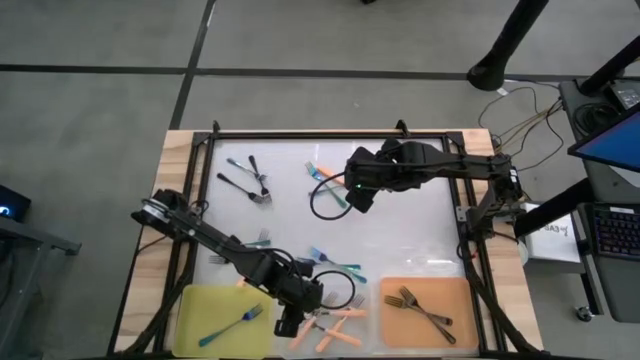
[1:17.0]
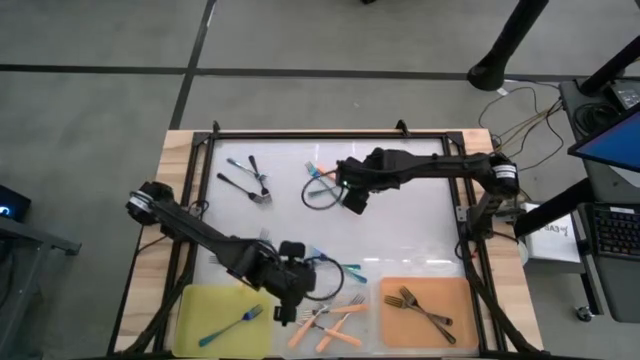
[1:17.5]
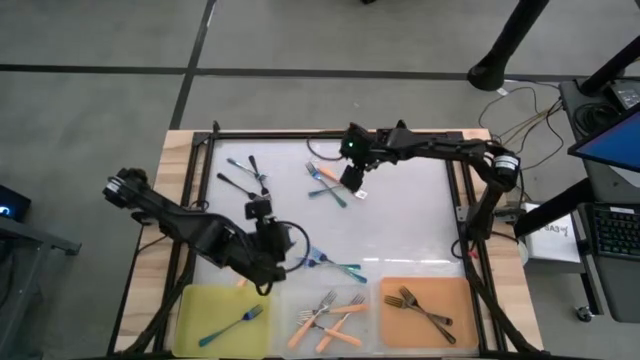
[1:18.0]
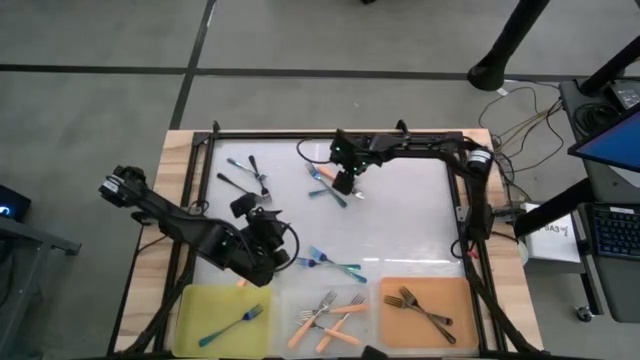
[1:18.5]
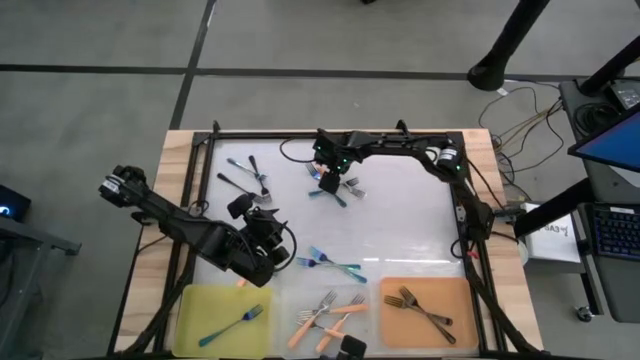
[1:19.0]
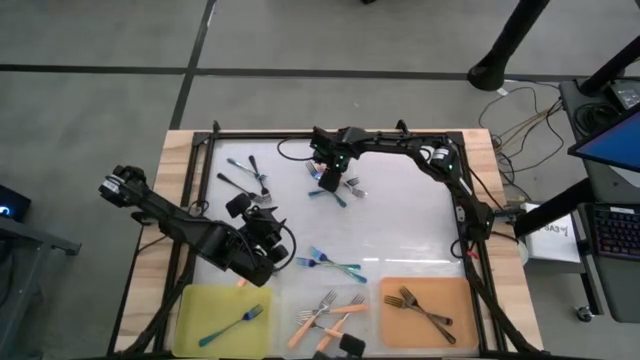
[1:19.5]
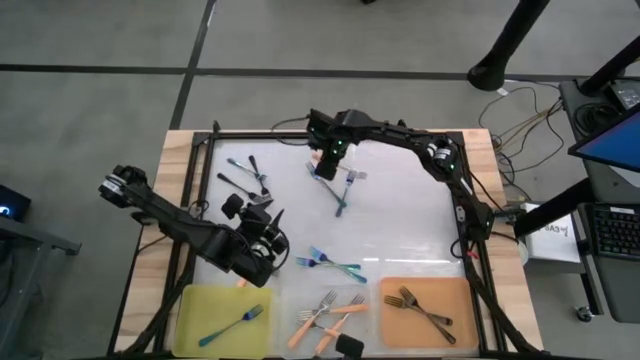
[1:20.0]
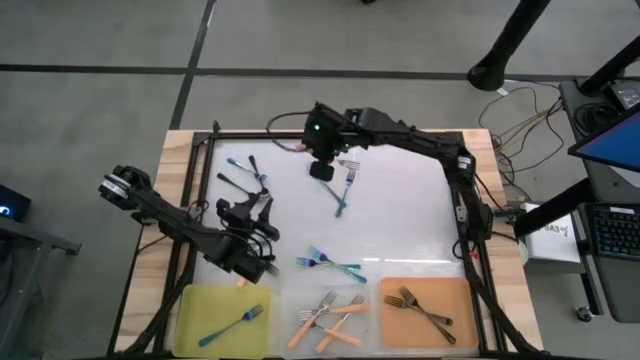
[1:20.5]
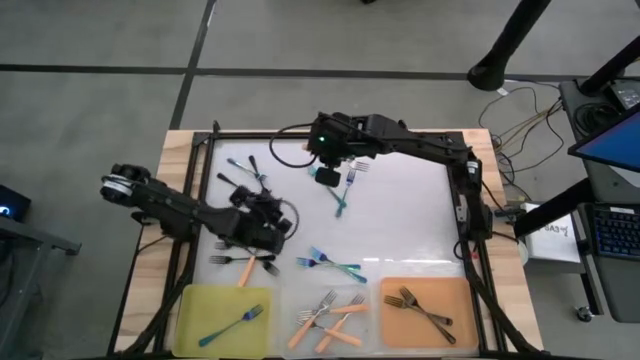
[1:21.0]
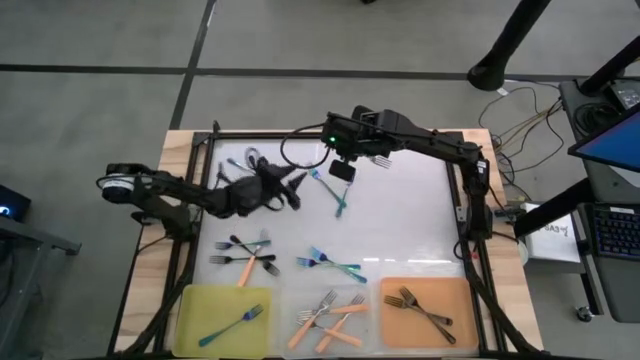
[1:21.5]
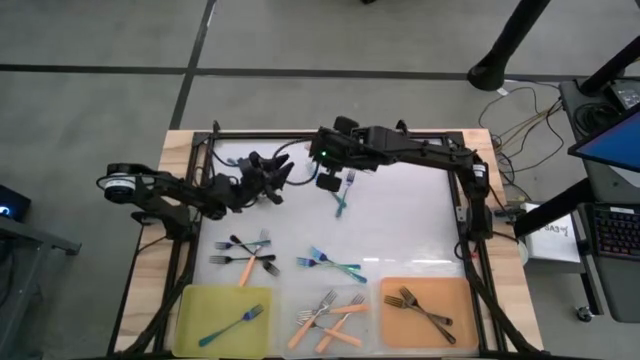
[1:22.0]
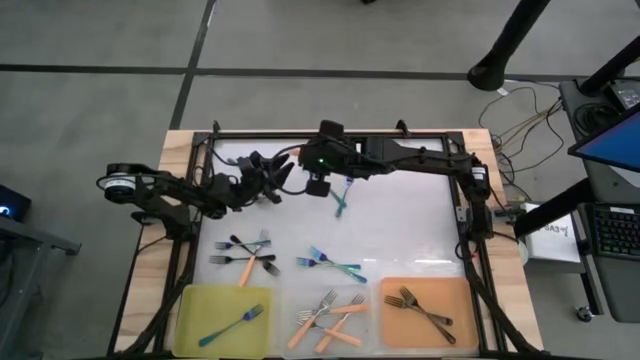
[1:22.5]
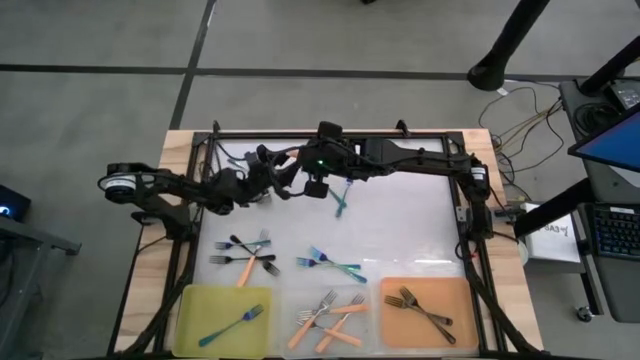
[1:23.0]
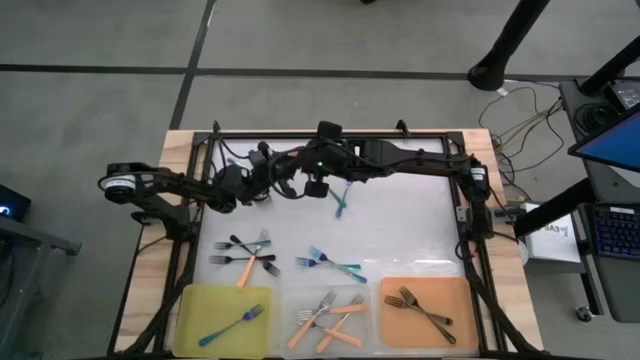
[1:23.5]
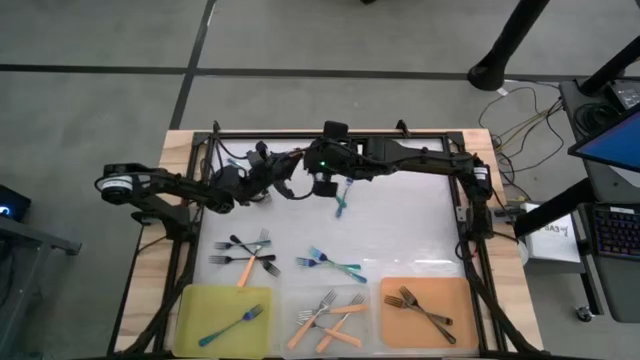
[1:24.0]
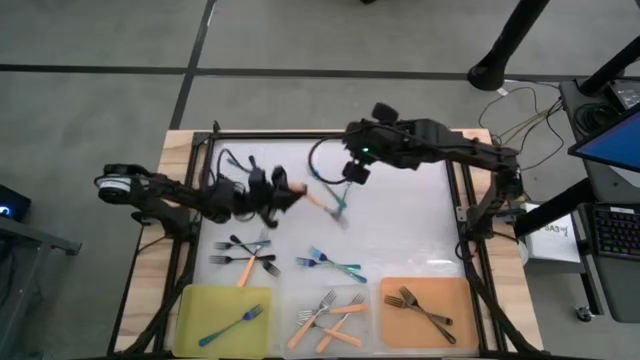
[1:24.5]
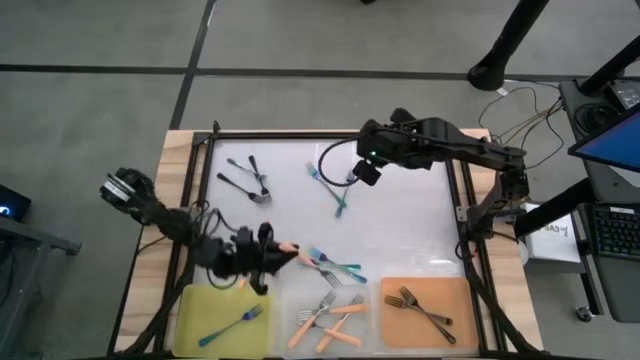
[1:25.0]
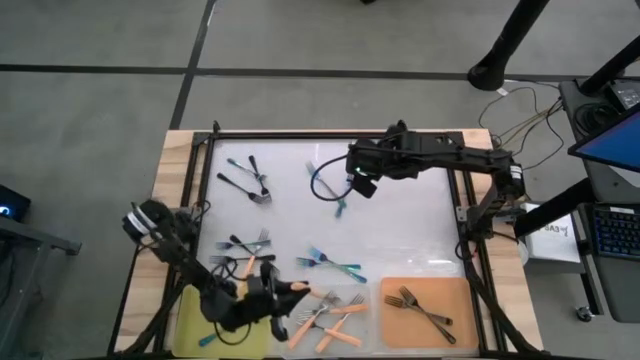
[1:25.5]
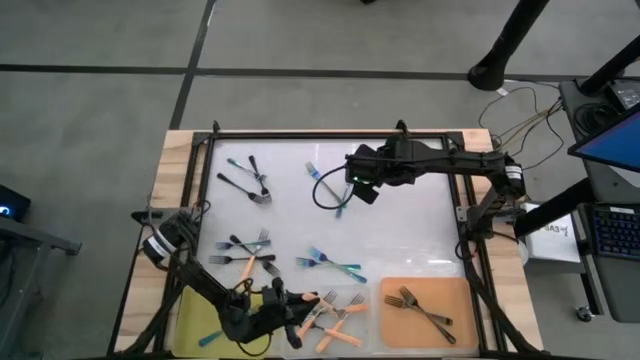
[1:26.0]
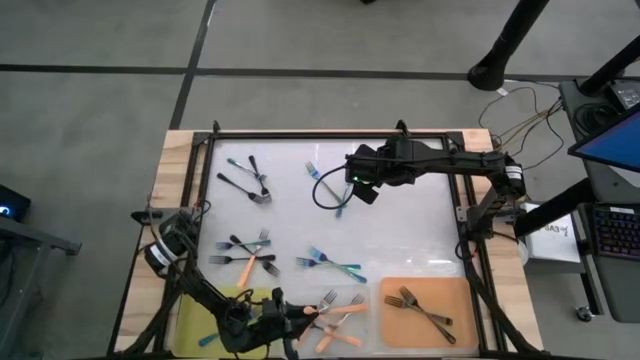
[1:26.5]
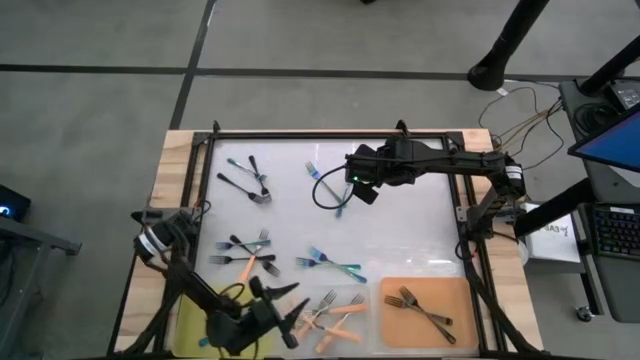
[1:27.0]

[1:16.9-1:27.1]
Task: Sort silverware by color (type)
Put the orange fork into the transparent bin

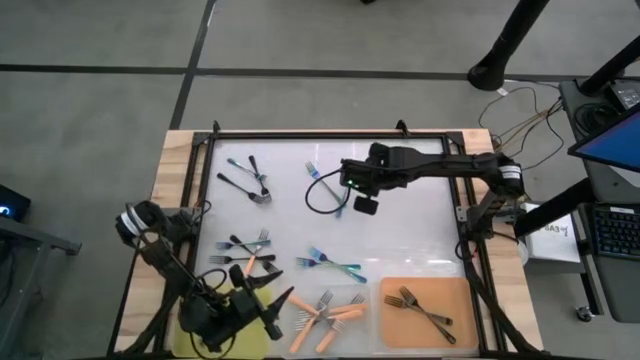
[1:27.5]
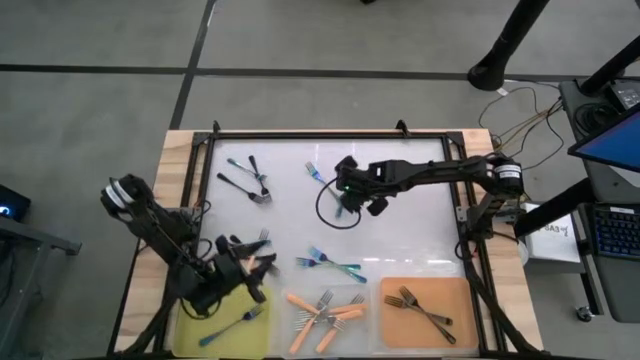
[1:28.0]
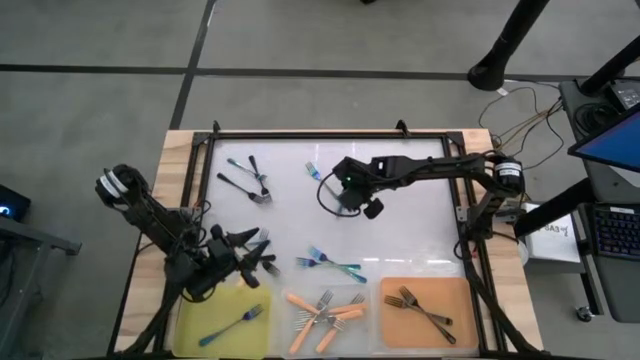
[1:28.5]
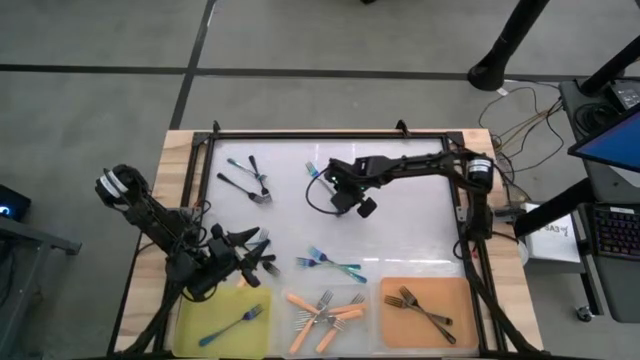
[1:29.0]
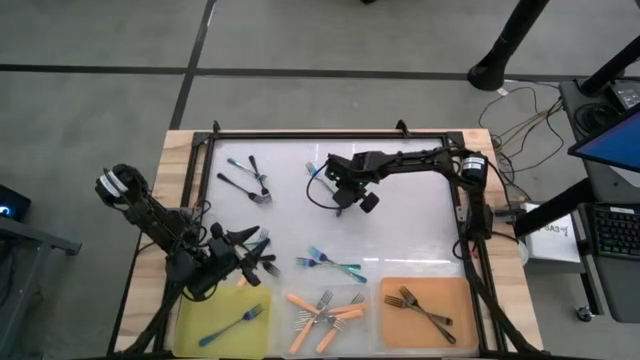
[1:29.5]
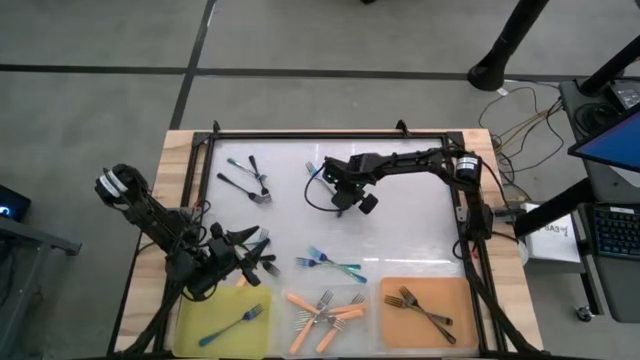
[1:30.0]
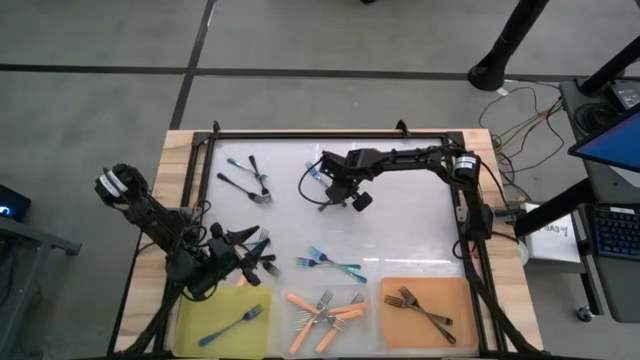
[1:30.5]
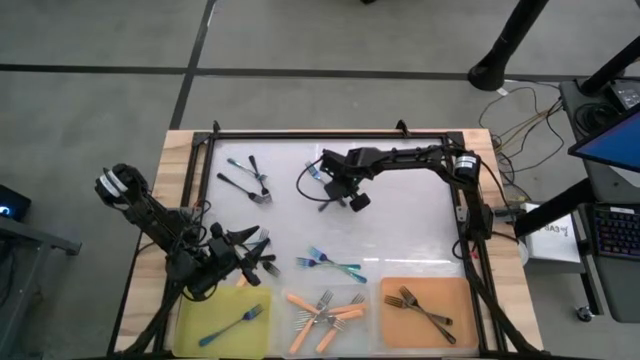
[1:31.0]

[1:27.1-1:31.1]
Put the blue fork into the yellow bin

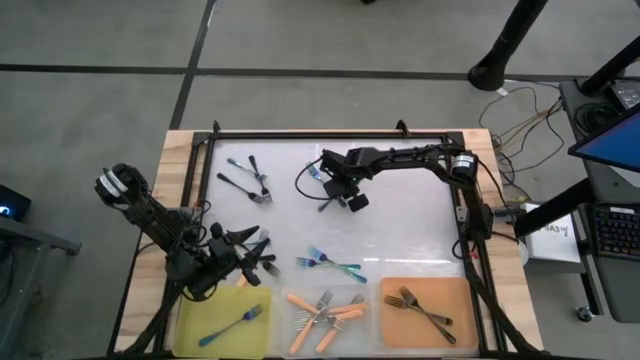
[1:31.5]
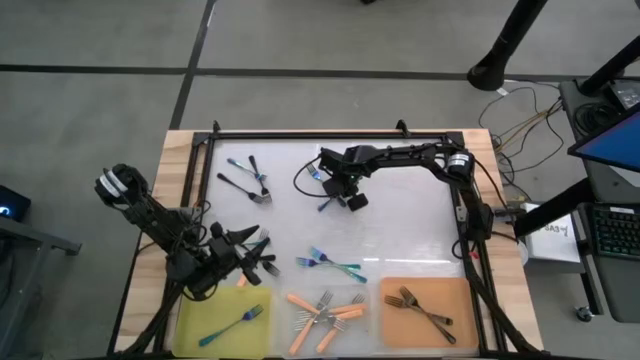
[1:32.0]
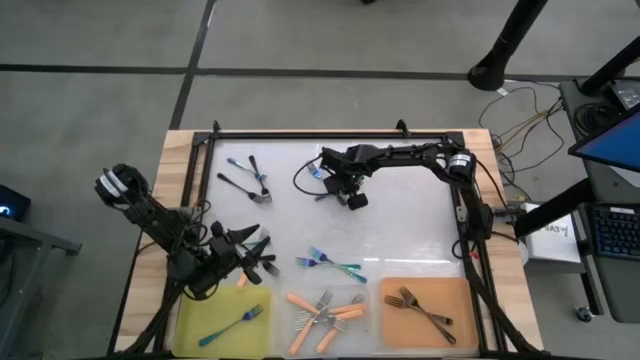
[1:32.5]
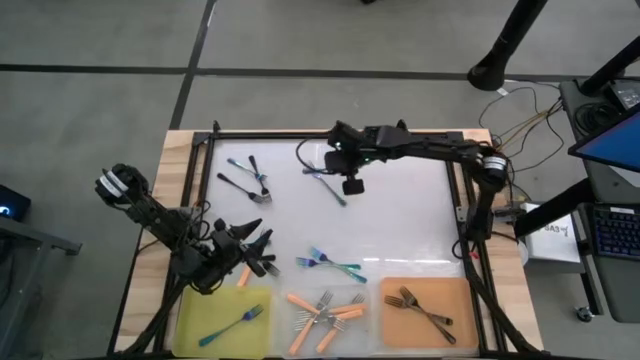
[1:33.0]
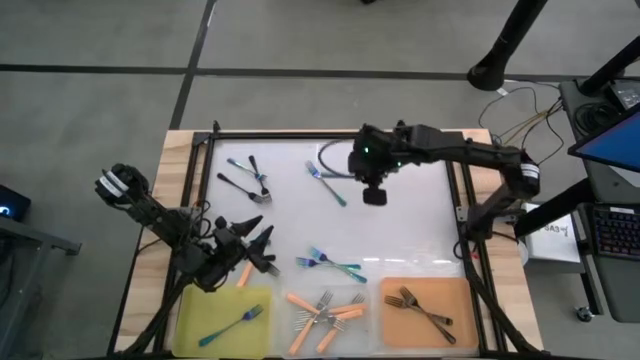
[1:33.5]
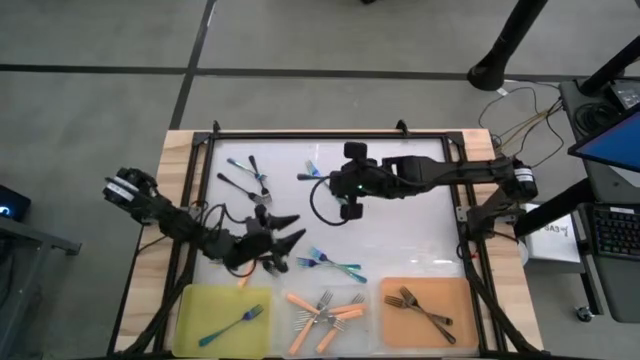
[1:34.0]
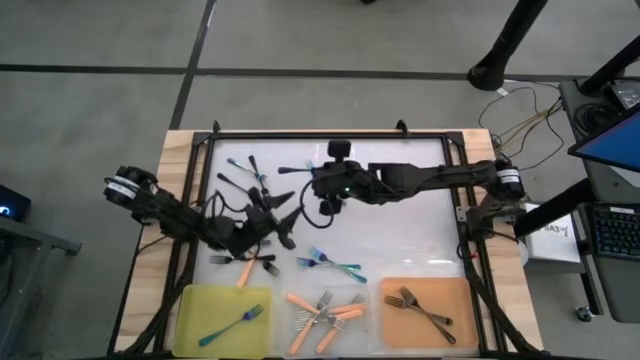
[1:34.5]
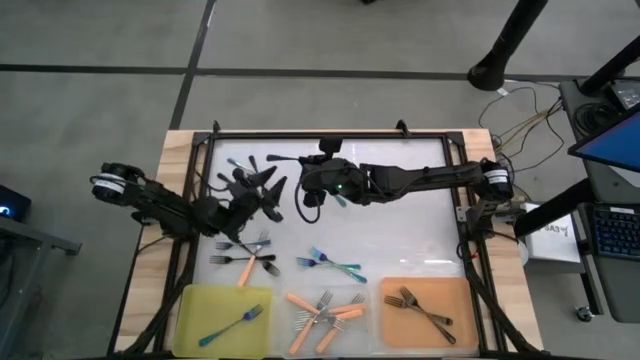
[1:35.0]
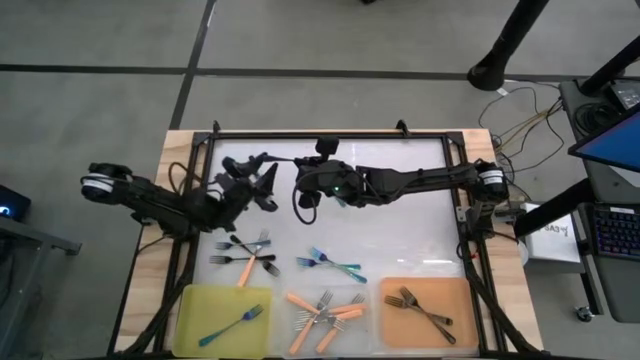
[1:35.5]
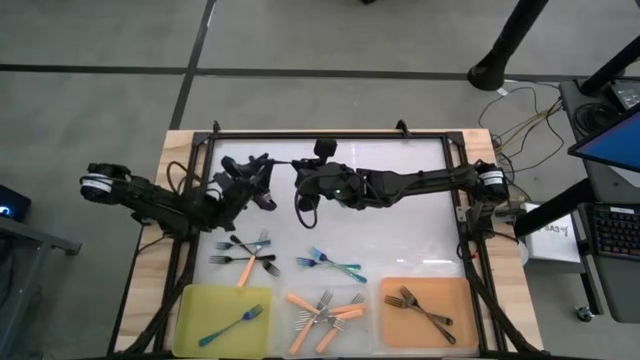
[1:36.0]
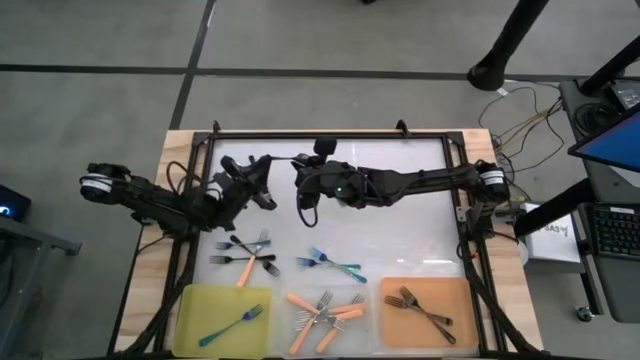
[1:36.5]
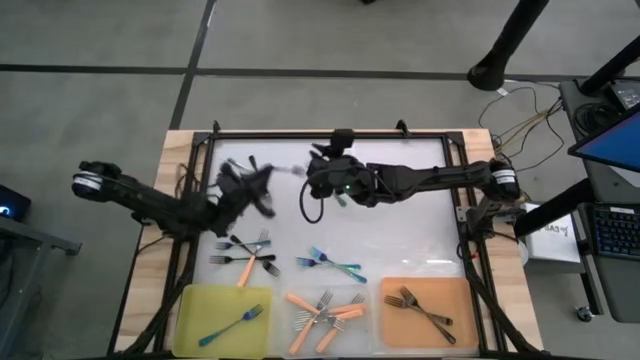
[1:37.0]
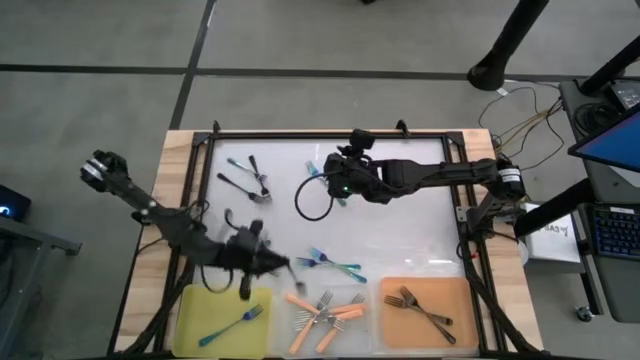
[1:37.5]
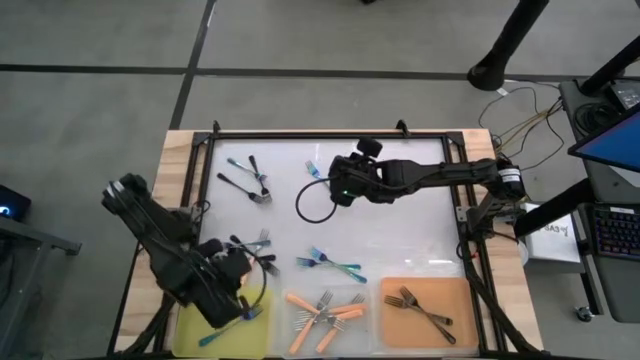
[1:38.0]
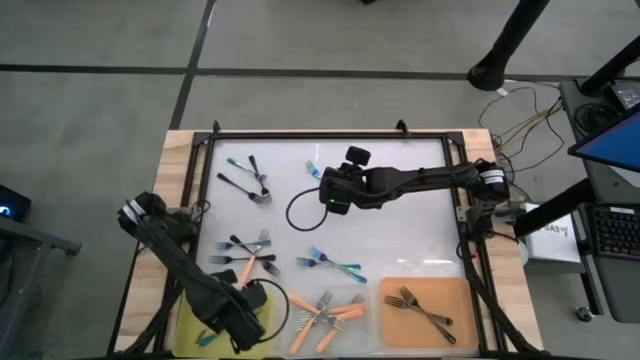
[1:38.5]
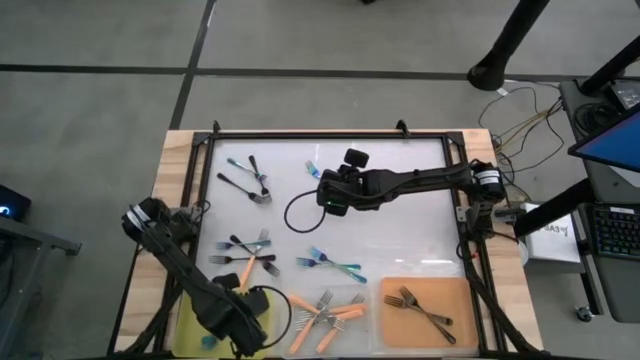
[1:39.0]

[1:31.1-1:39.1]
Put the blue fork into the yellow bin
